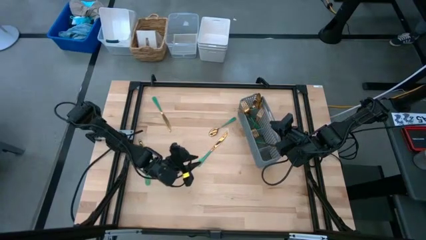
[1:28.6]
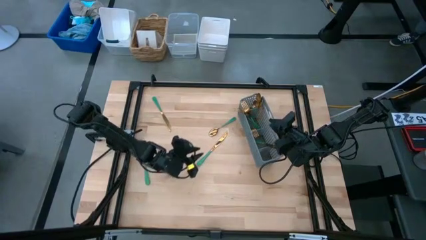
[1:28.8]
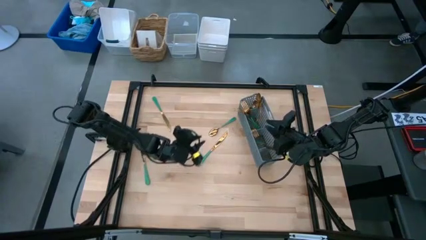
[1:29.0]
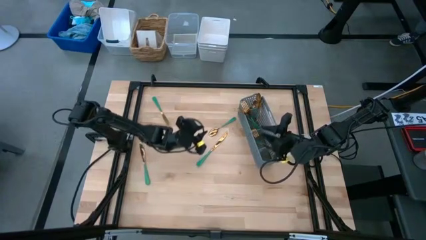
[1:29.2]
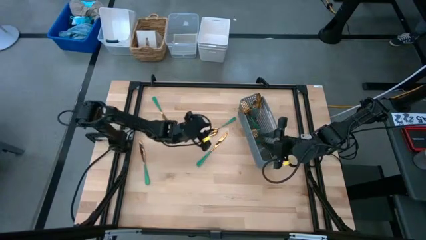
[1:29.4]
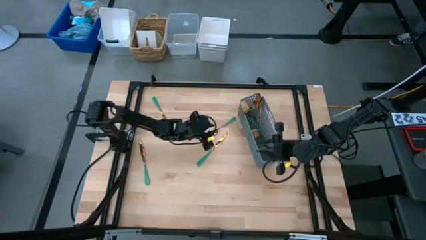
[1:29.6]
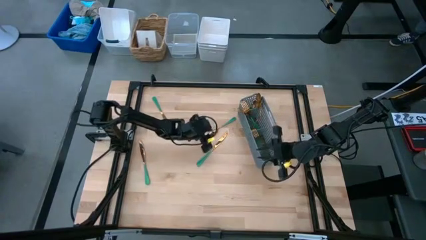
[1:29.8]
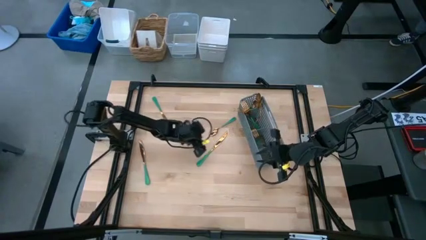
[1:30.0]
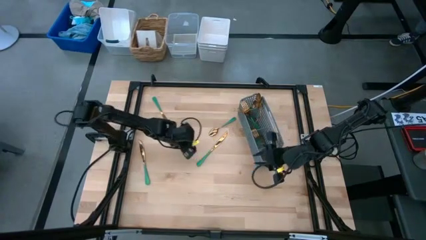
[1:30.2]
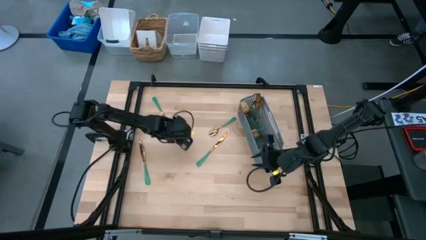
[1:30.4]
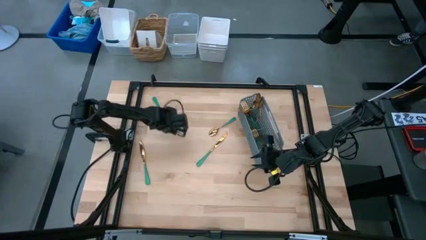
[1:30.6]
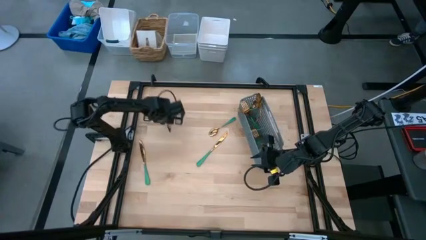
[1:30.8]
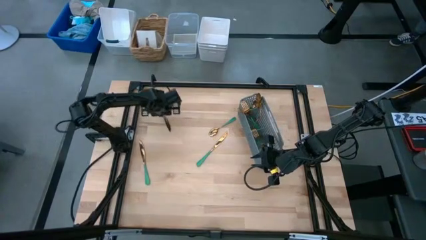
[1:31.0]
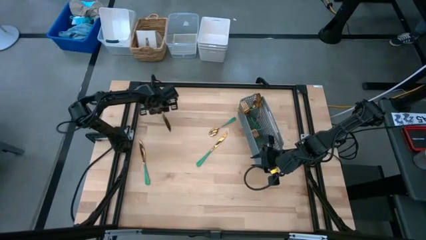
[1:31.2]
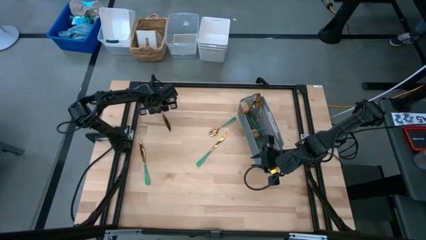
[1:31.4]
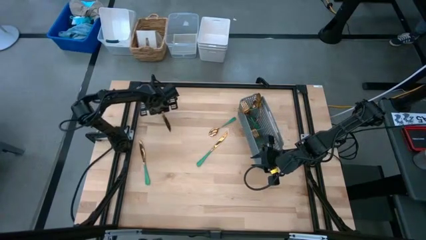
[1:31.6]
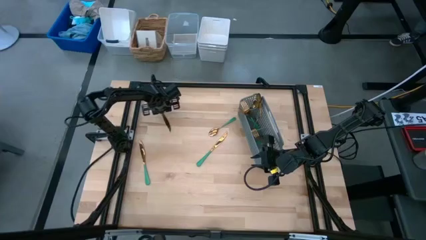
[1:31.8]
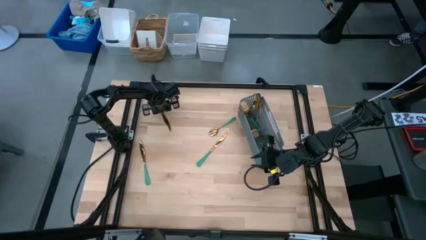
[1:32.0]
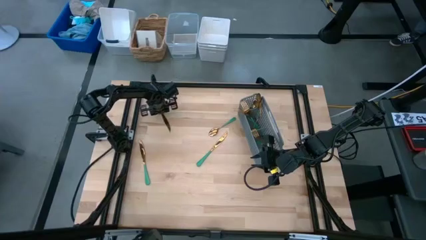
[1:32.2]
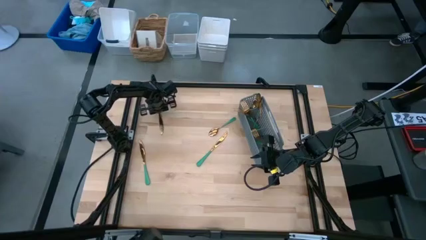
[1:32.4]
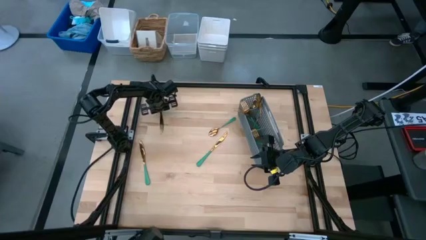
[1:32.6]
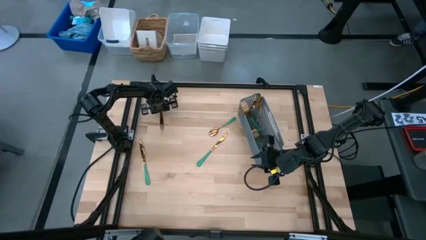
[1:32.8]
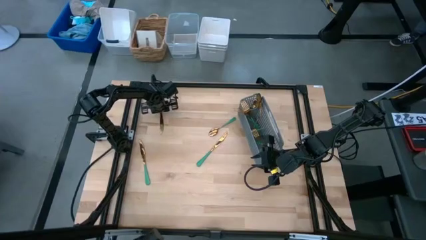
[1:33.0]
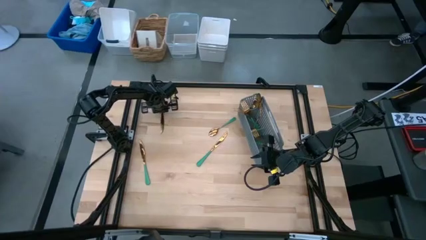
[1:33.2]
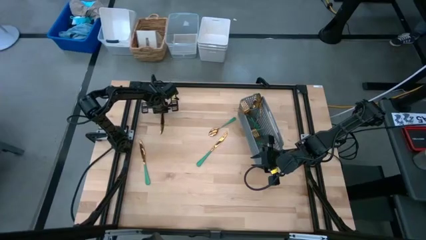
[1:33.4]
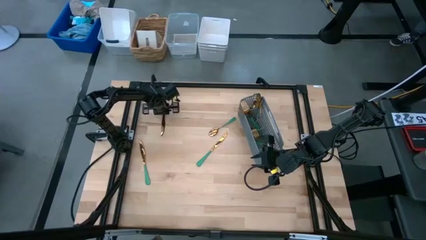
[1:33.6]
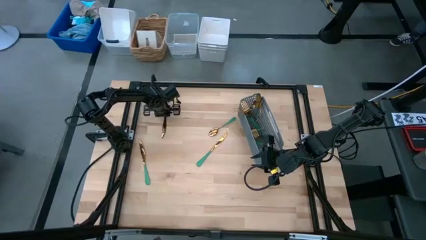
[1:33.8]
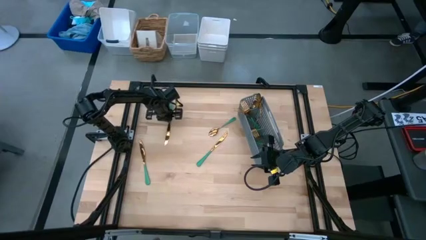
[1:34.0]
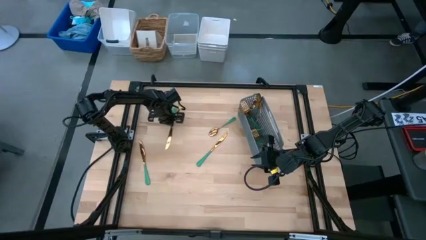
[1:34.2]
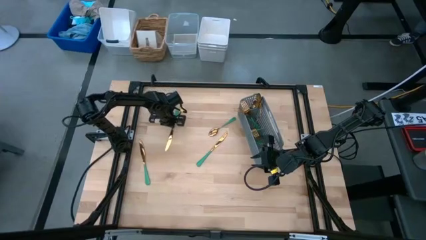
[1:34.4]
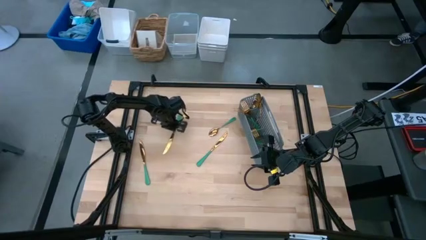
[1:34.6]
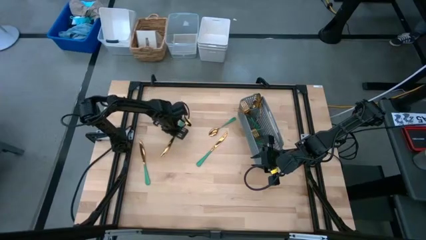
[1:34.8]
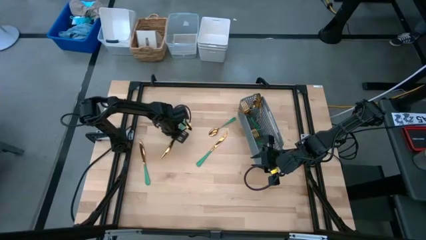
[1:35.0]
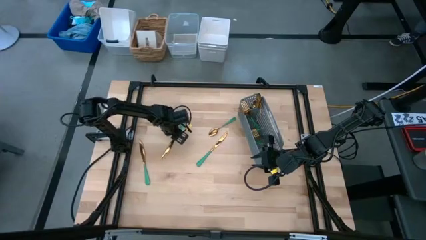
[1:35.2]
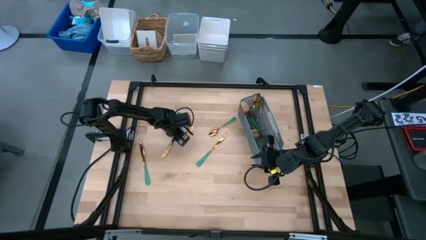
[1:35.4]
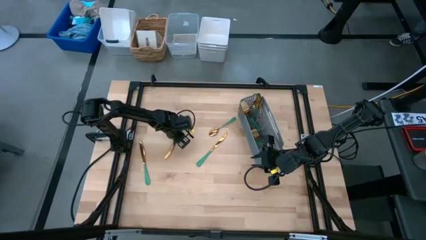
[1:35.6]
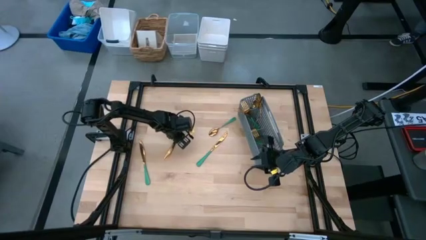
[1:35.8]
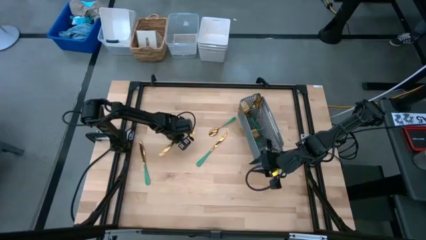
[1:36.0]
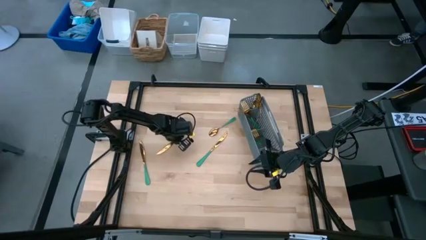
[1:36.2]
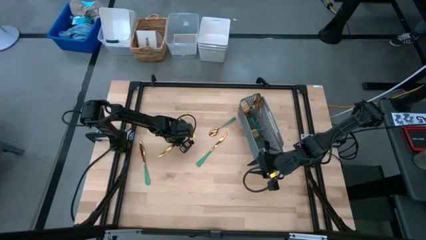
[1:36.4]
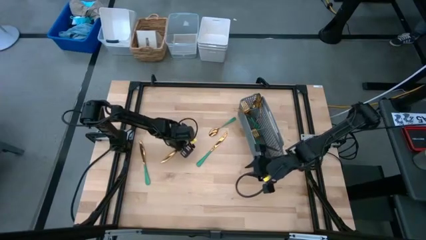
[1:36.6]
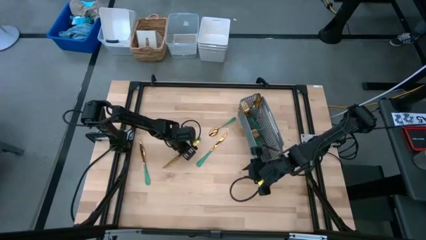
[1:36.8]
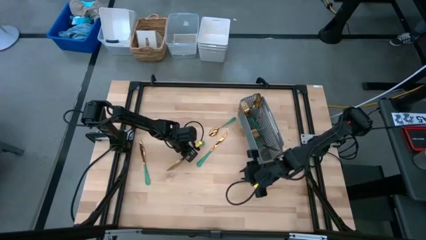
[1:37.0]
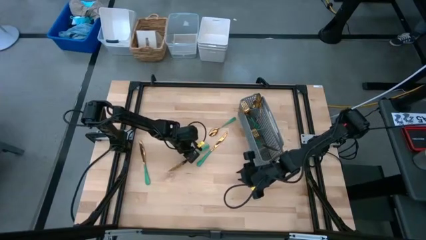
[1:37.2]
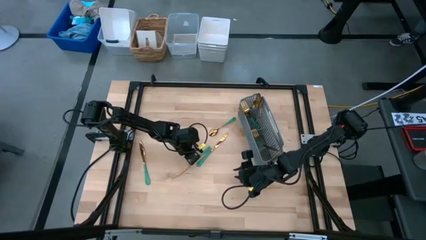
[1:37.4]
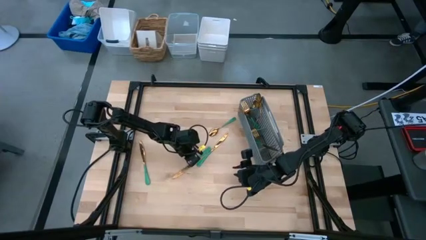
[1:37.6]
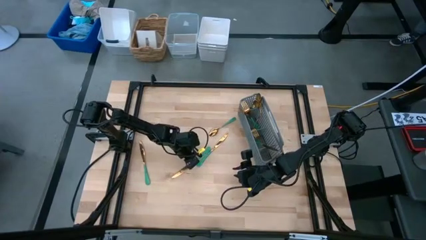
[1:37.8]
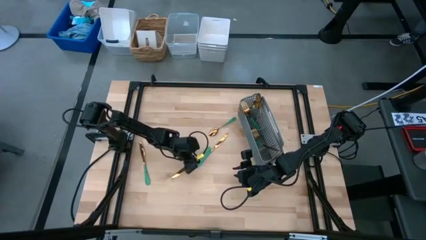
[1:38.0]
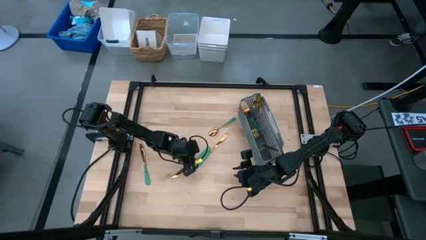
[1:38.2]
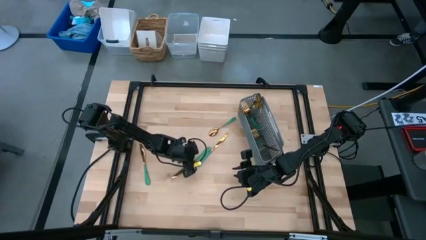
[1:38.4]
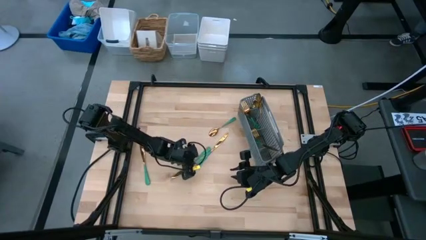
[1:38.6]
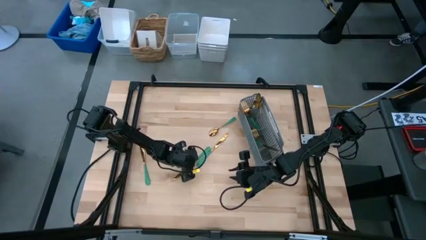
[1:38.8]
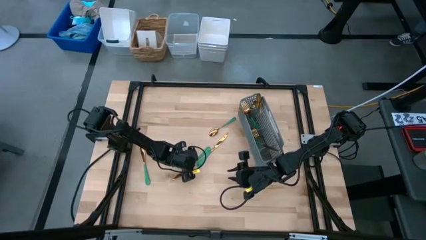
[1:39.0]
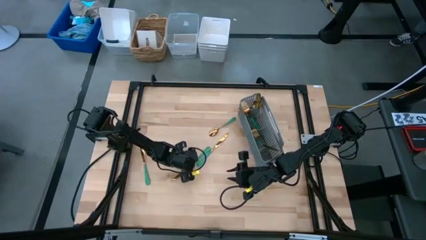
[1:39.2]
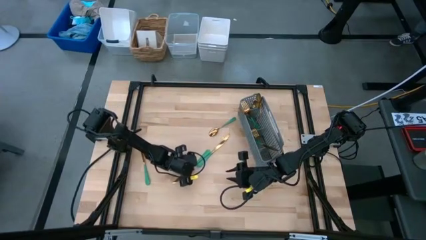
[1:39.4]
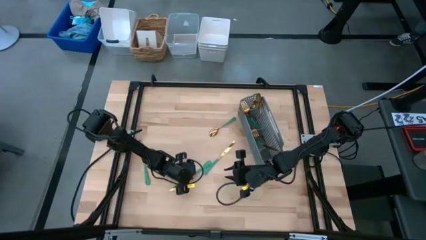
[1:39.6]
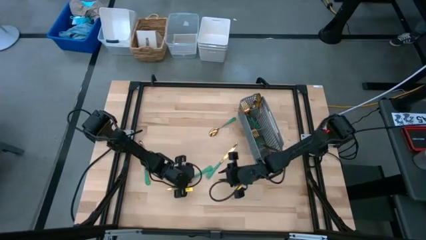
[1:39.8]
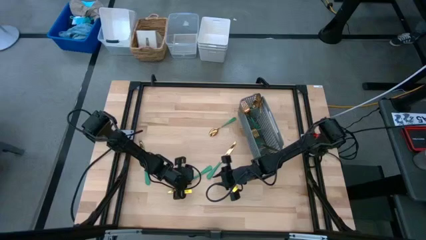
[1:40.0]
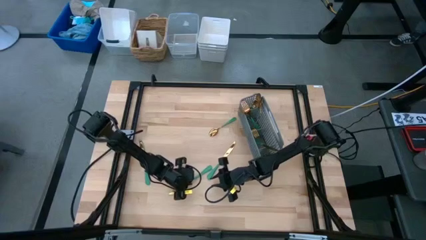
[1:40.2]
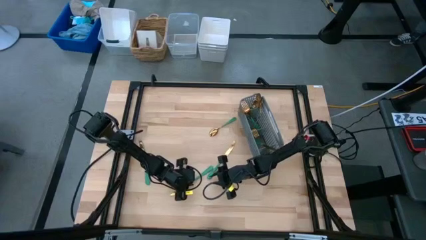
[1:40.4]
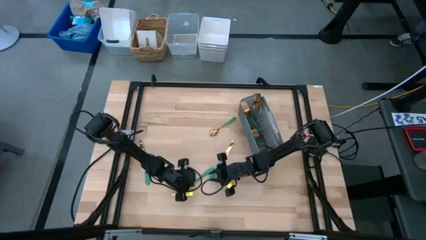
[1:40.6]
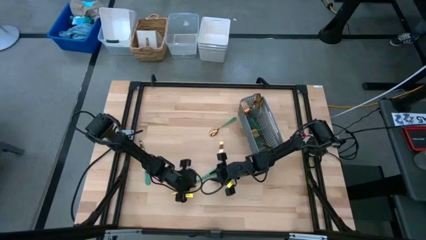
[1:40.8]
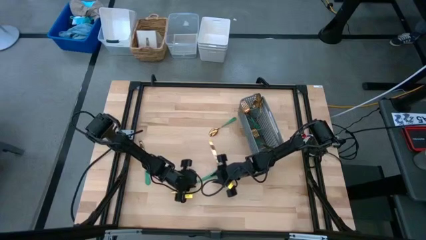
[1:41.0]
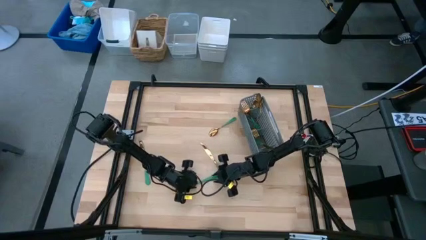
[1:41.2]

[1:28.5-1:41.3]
Task: Sort silverware
Put the top left fork into the bottom section of the basket

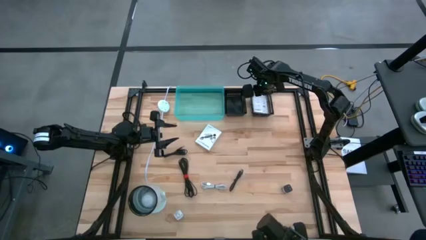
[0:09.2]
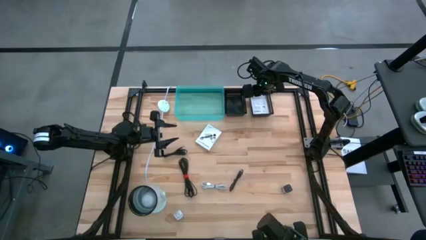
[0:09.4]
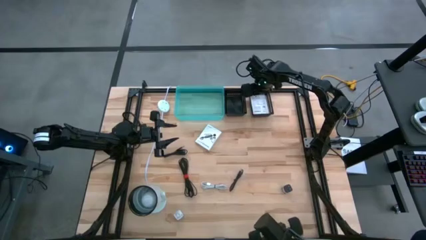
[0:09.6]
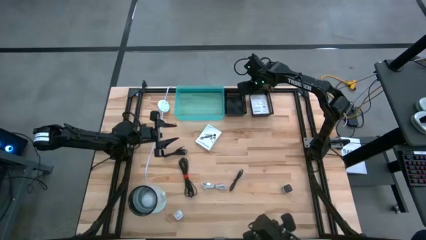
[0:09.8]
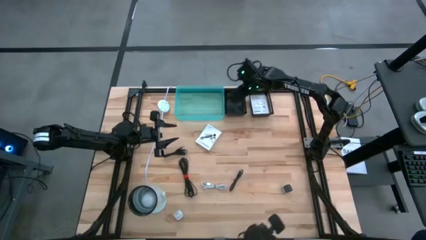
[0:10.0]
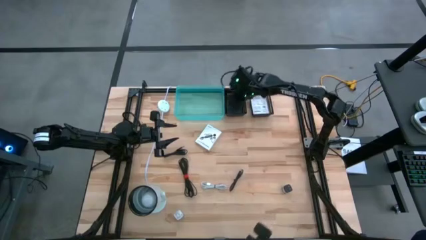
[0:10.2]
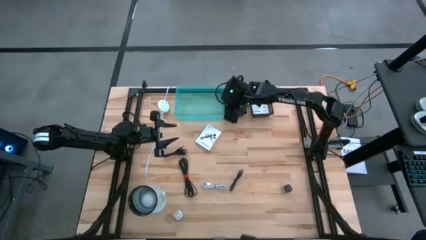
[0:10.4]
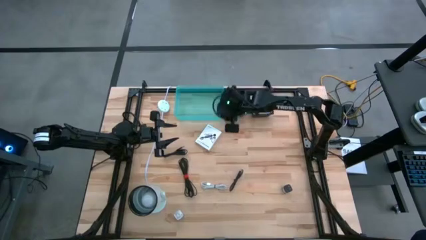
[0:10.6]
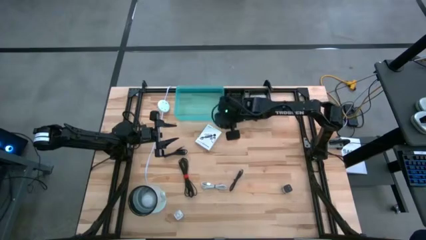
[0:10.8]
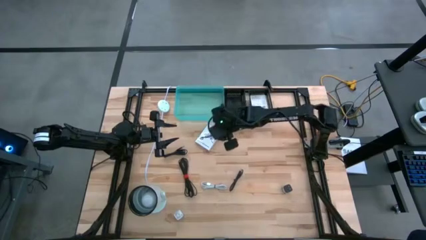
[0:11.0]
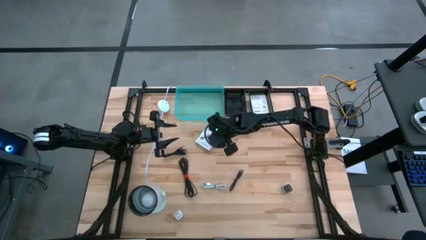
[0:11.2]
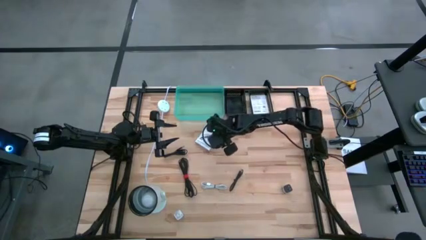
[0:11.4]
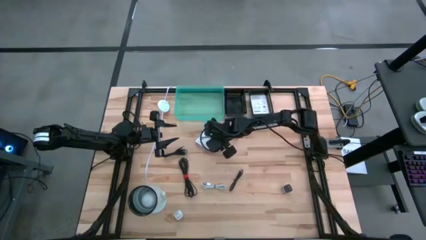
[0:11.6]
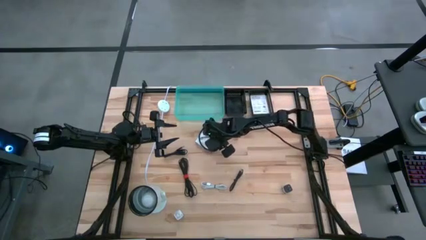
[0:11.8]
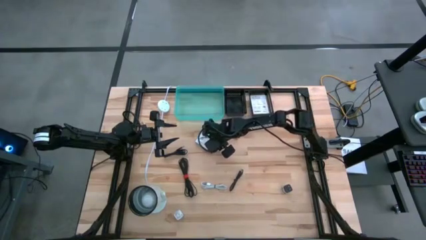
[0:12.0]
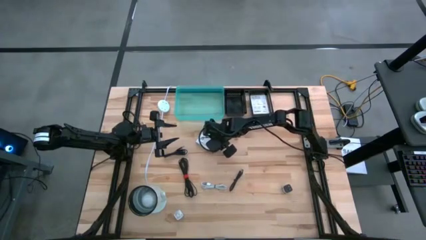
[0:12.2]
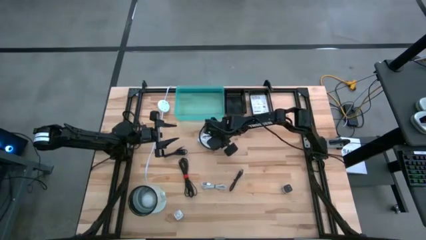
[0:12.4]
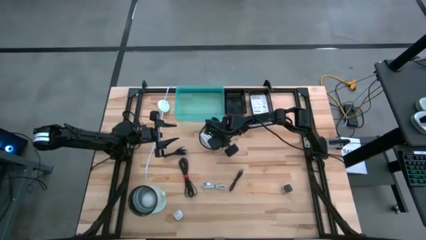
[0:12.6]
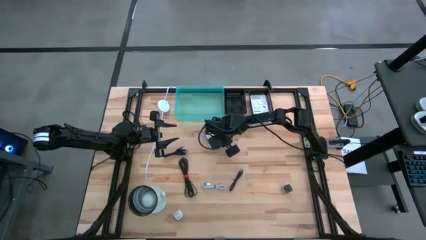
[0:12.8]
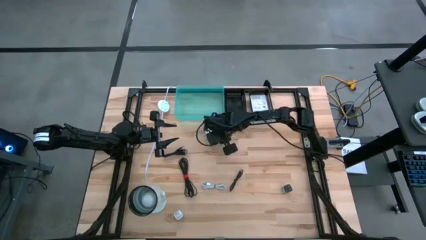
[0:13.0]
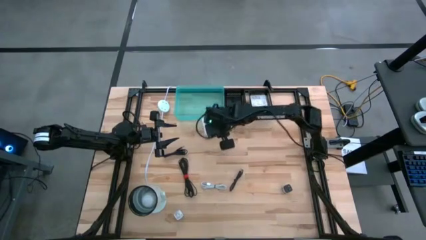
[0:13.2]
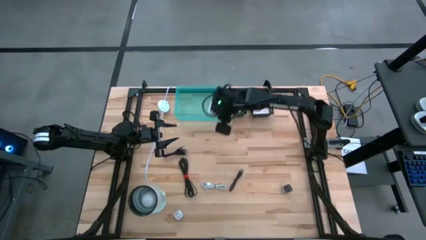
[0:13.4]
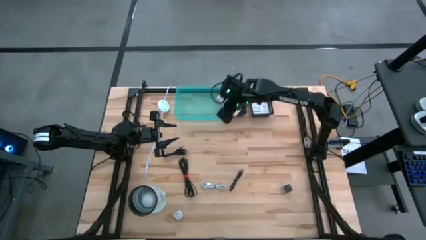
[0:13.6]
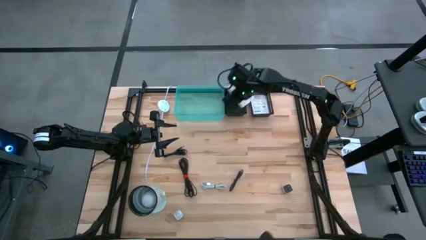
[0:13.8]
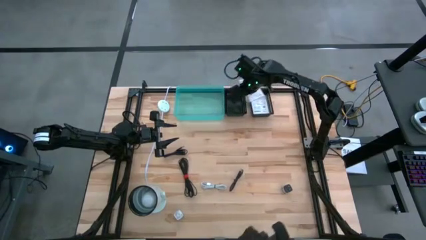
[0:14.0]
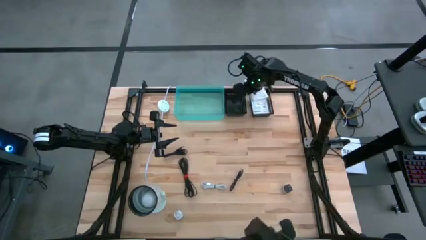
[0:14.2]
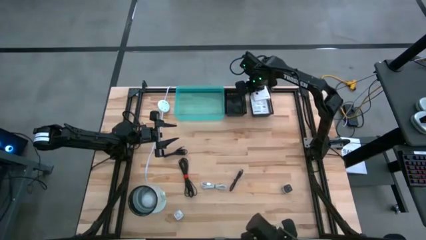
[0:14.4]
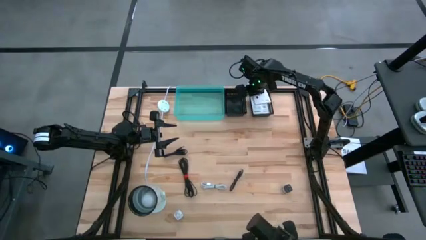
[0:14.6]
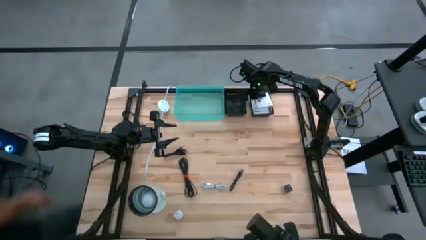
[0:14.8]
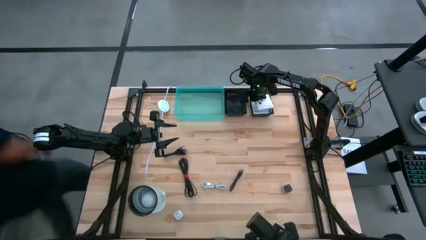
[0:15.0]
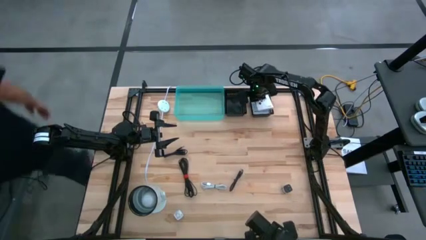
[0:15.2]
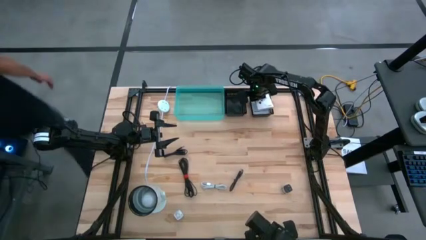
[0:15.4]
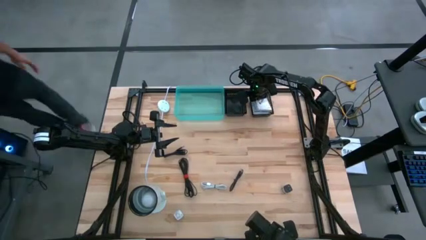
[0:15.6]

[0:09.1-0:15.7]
Task: Pick and place items into bin
Put the card reader box into the right black bin
